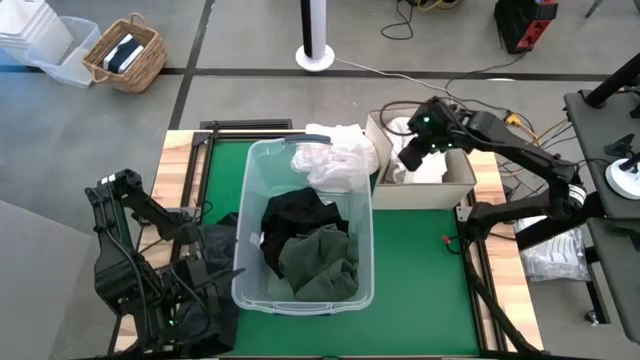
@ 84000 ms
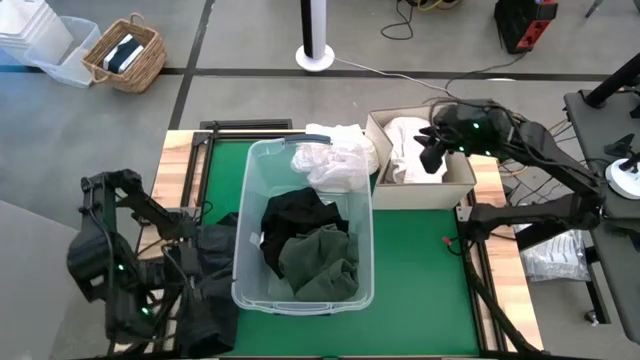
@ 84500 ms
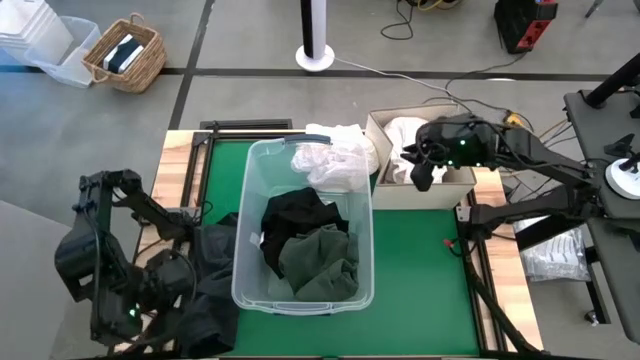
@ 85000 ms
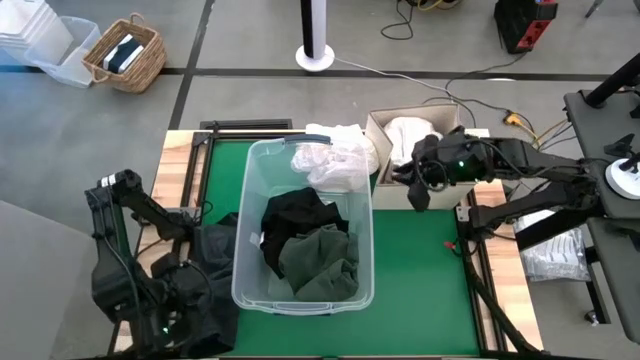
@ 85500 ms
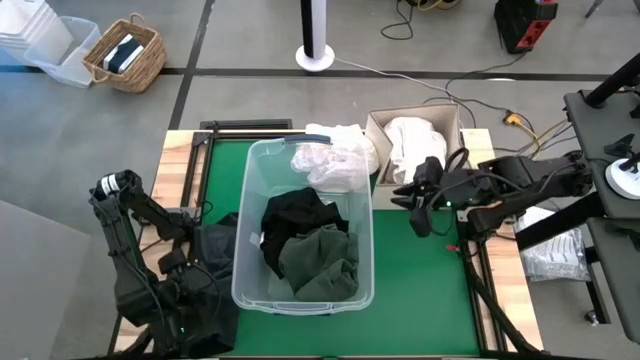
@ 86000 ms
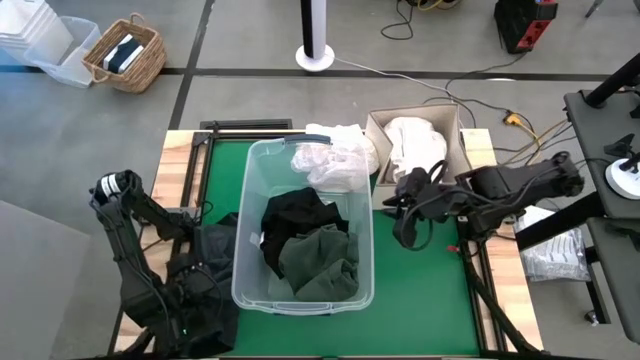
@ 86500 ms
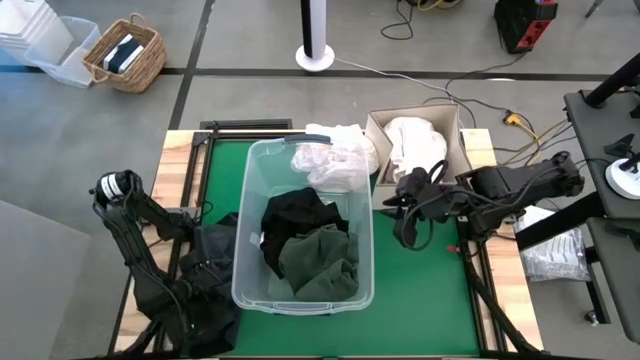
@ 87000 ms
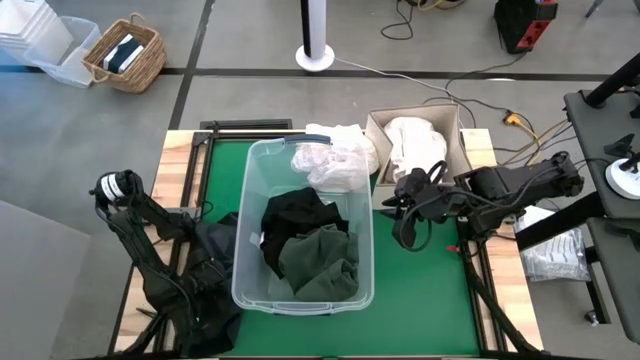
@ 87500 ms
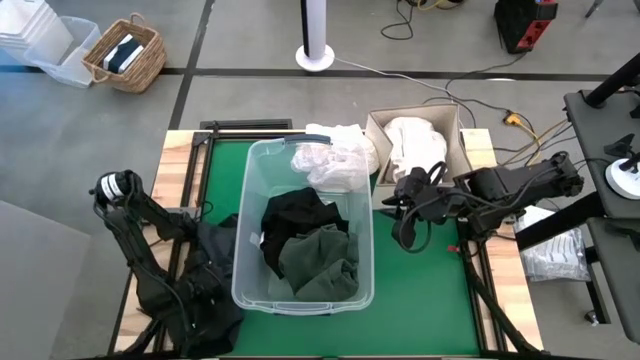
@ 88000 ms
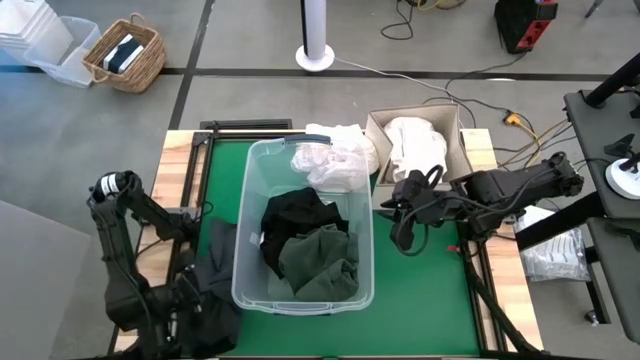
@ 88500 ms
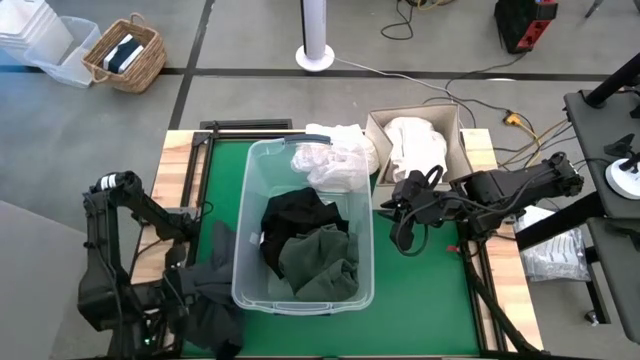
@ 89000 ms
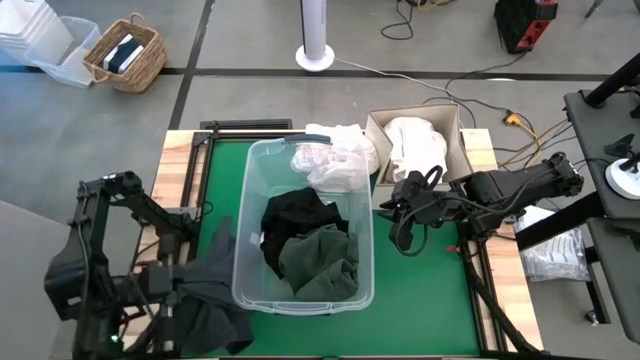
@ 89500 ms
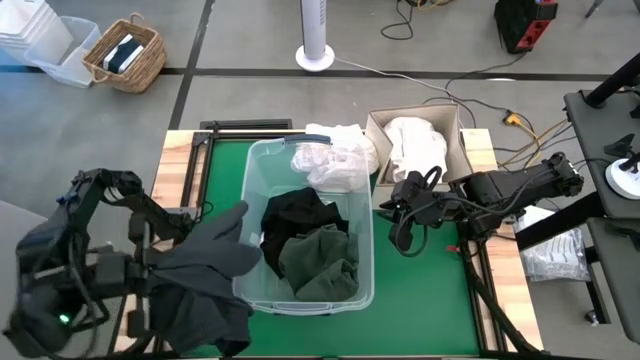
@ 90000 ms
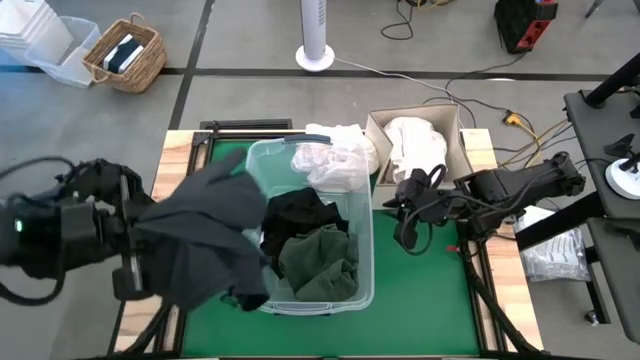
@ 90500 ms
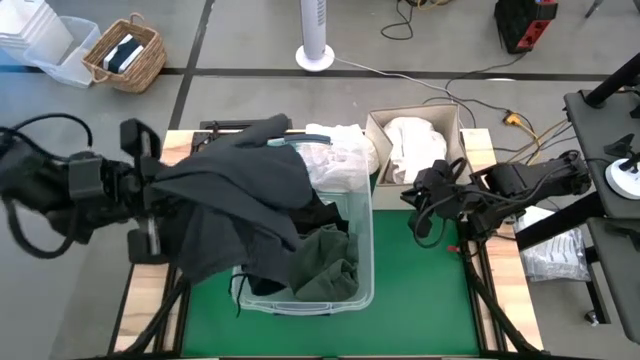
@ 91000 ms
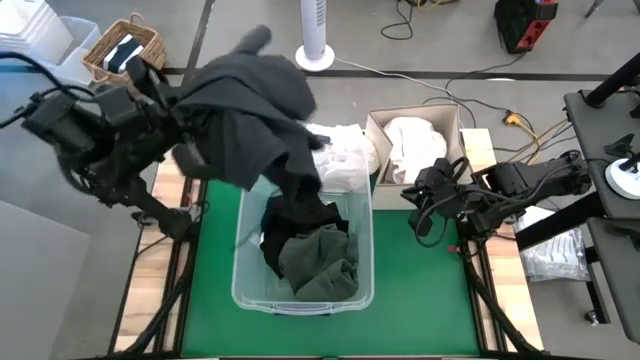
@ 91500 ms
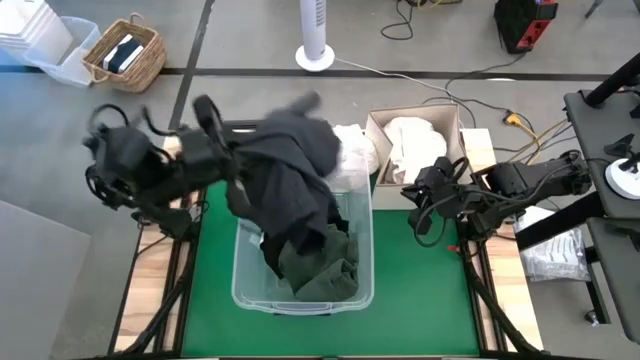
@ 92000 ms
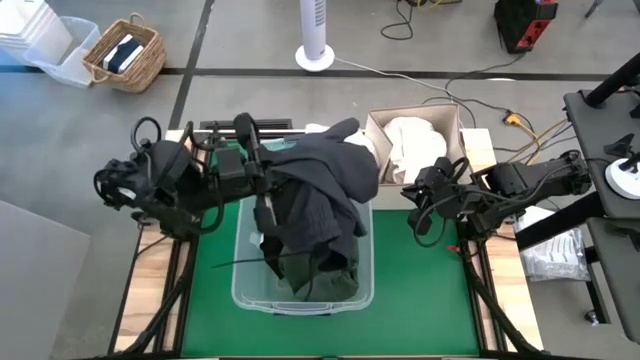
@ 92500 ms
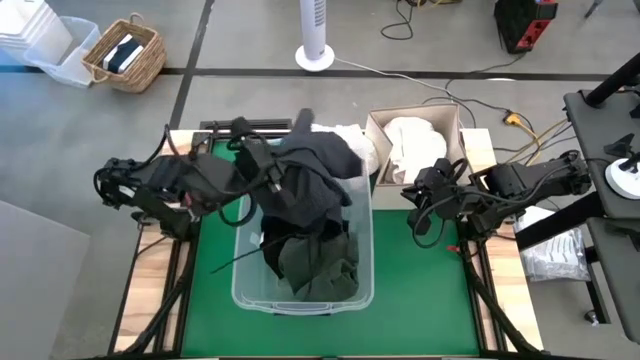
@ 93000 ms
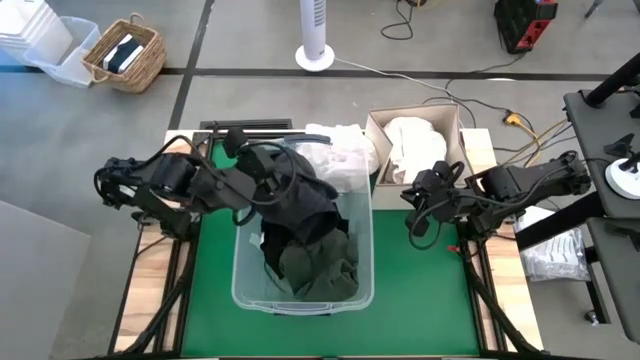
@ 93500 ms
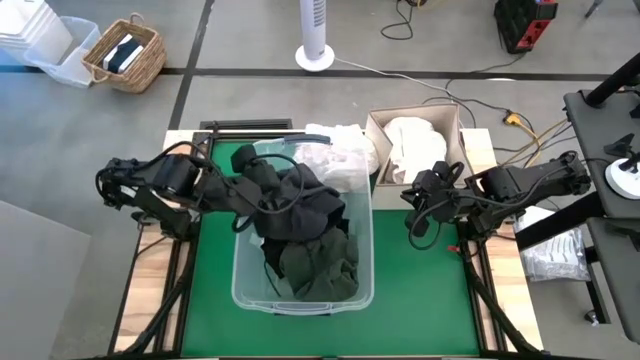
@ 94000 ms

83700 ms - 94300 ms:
Put the black shorts into the transparent bin

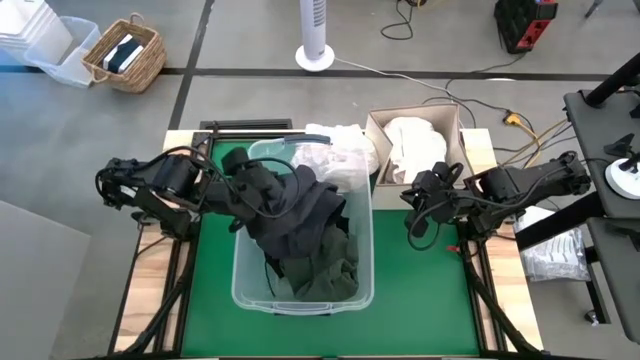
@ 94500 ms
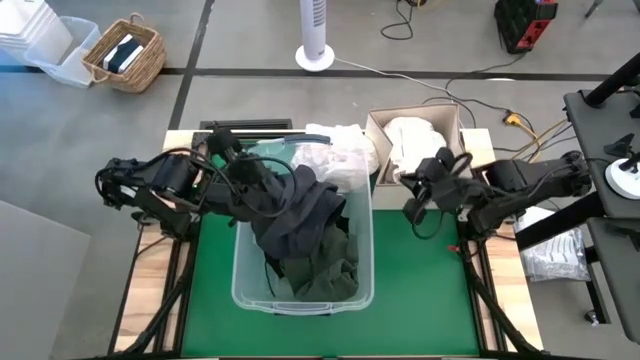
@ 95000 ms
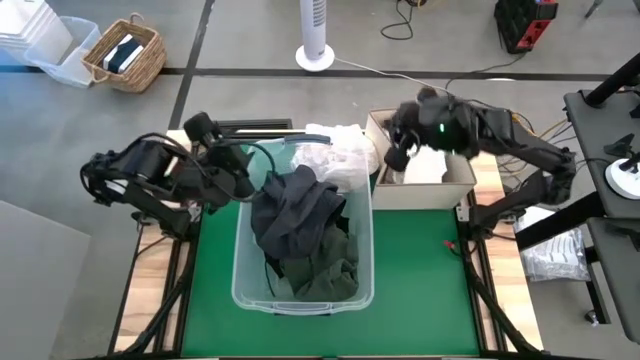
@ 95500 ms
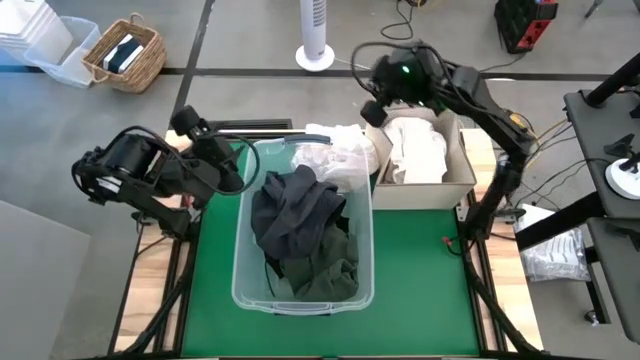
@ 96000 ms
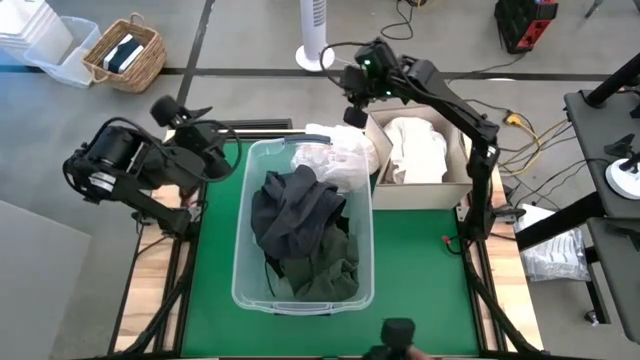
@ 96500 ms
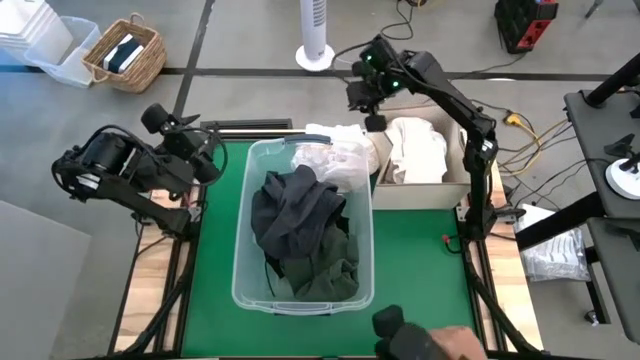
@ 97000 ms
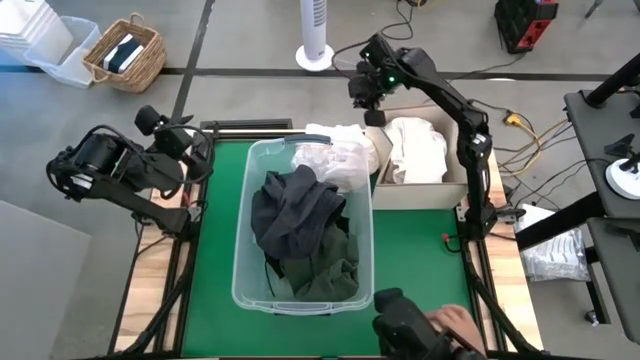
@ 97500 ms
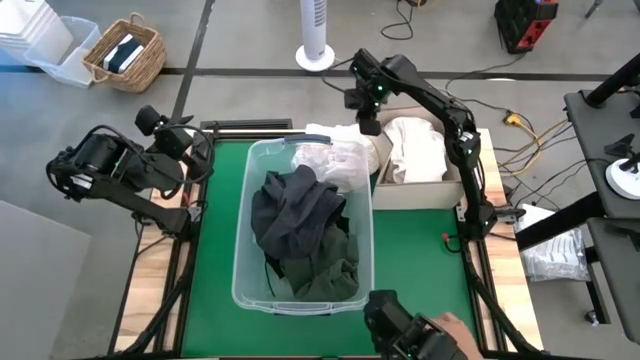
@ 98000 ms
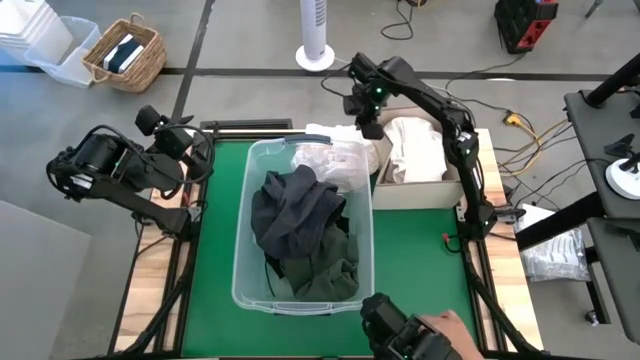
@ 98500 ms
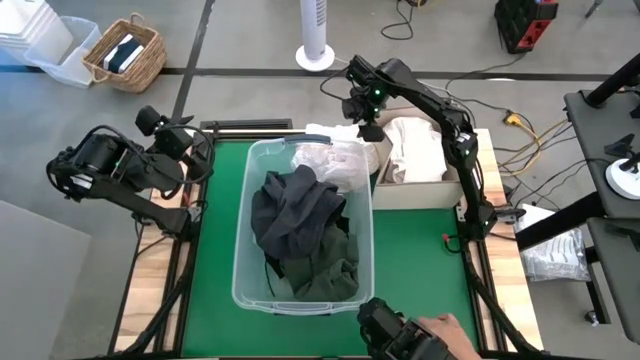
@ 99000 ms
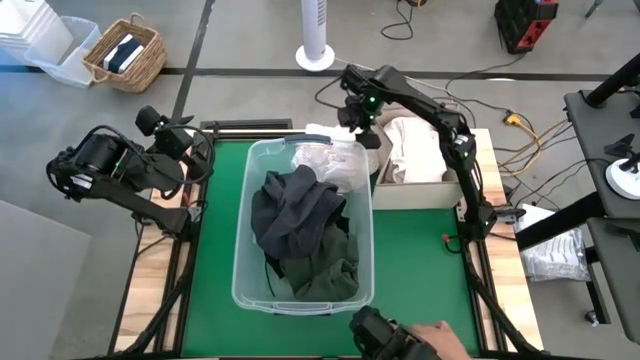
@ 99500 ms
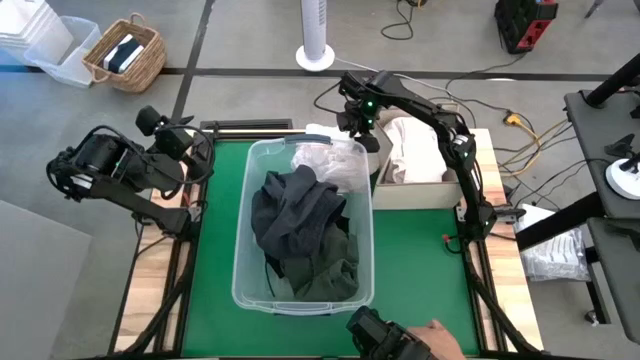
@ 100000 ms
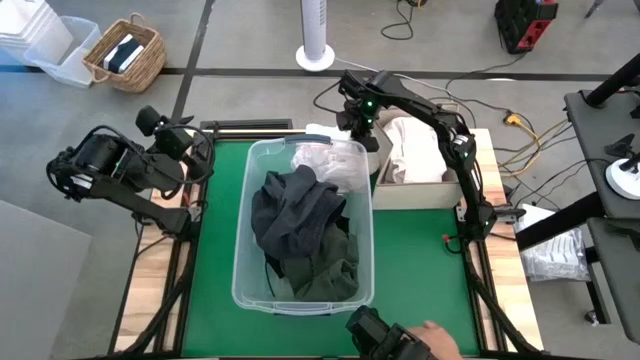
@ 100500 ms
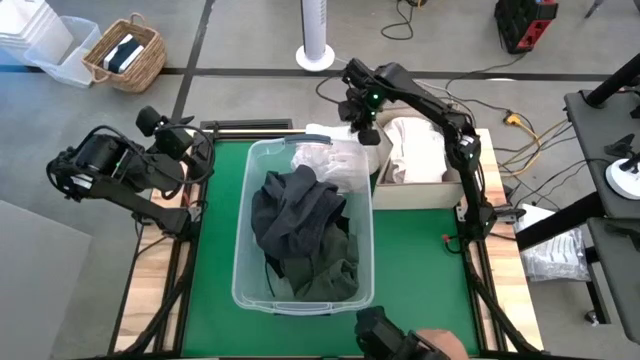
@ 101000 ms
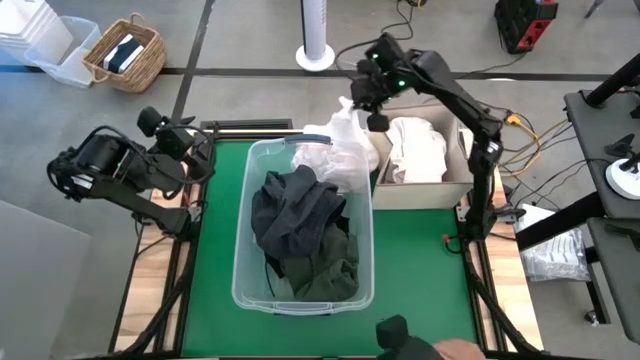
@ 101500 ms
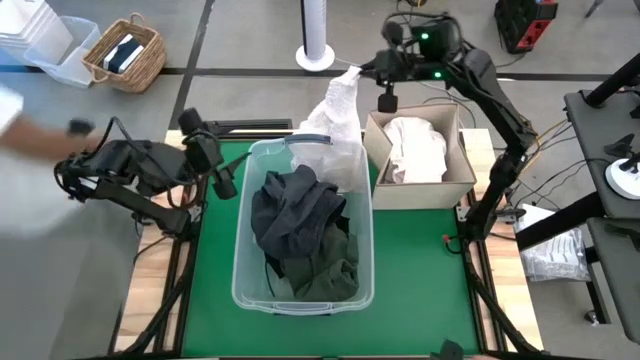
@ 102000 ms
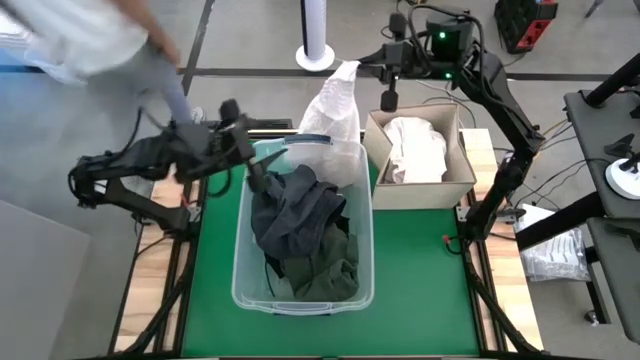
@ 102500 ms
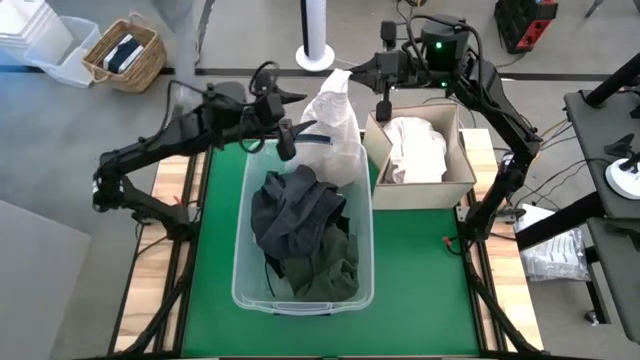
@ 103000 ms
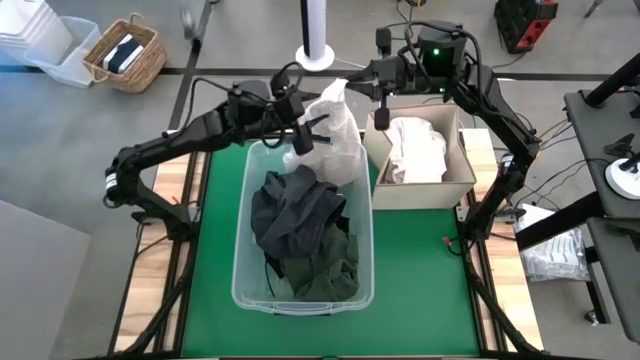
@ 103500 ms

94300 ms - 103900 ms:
Put the white blouse into the laundry organizer
